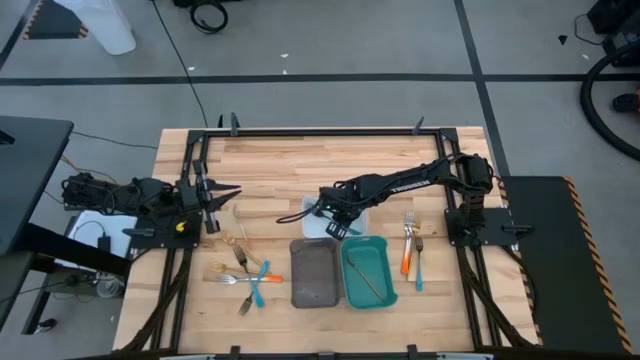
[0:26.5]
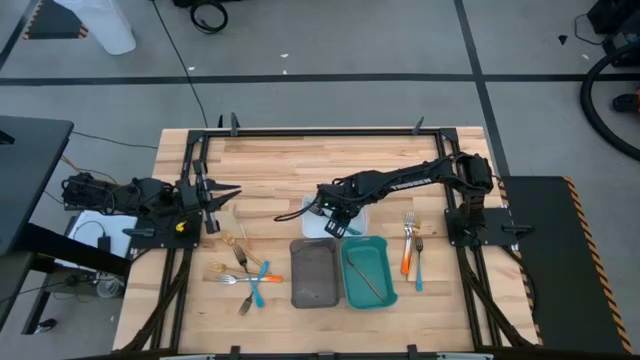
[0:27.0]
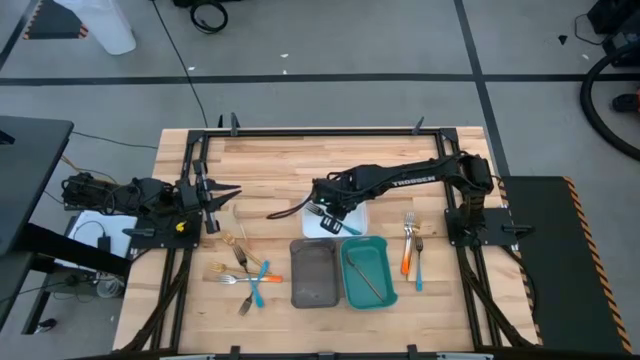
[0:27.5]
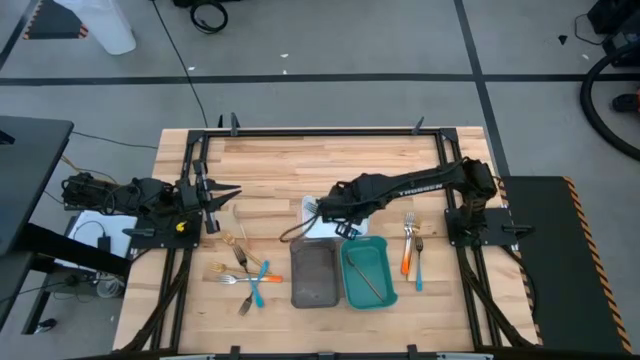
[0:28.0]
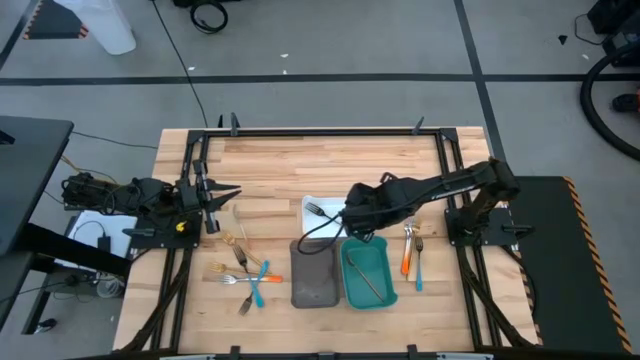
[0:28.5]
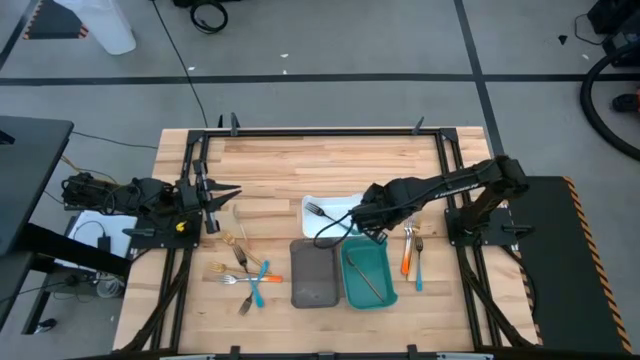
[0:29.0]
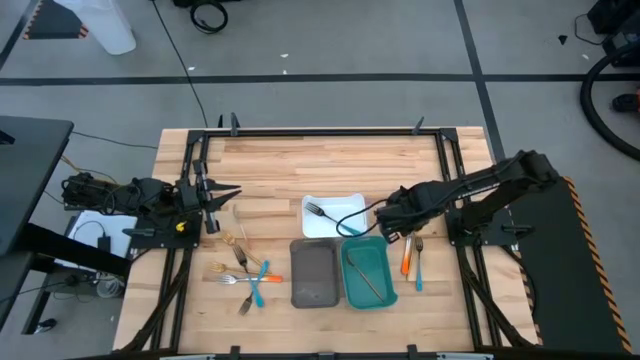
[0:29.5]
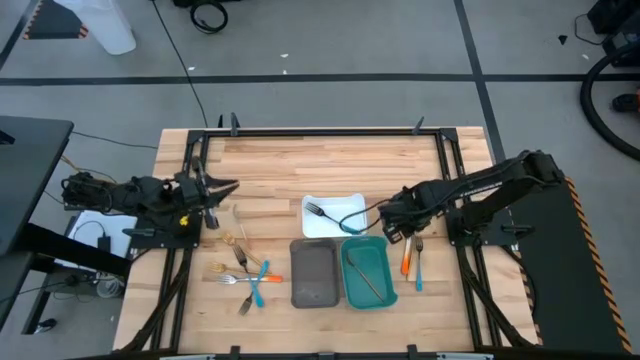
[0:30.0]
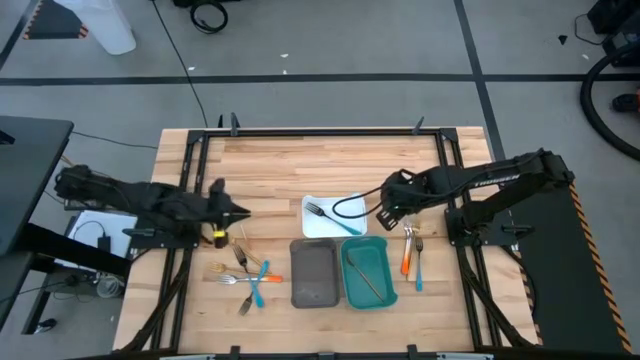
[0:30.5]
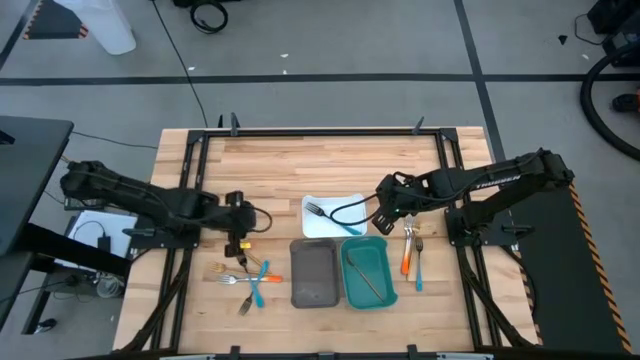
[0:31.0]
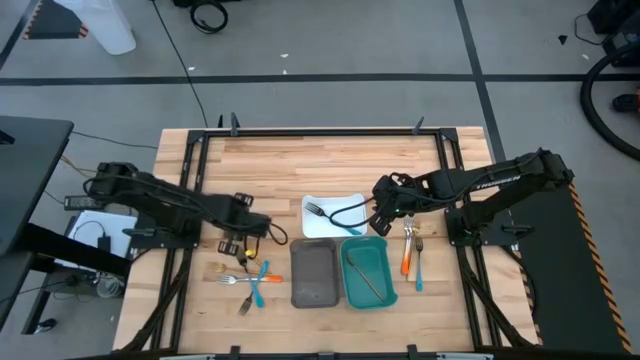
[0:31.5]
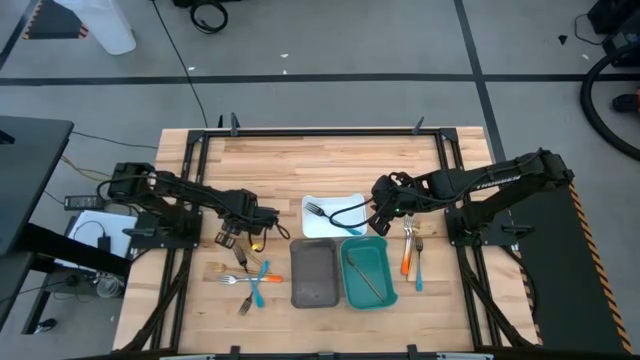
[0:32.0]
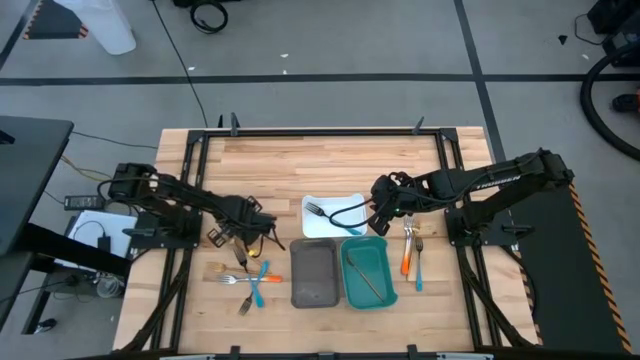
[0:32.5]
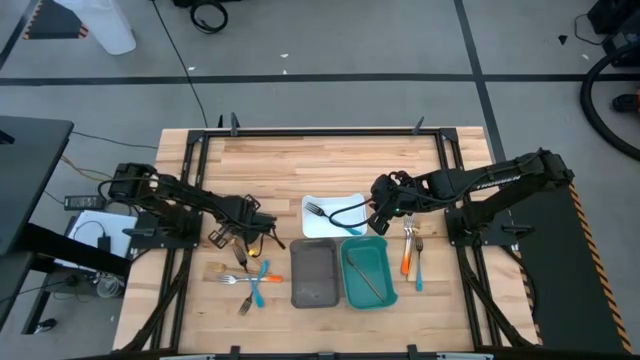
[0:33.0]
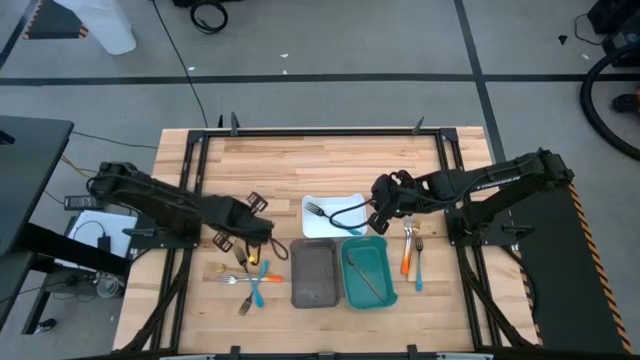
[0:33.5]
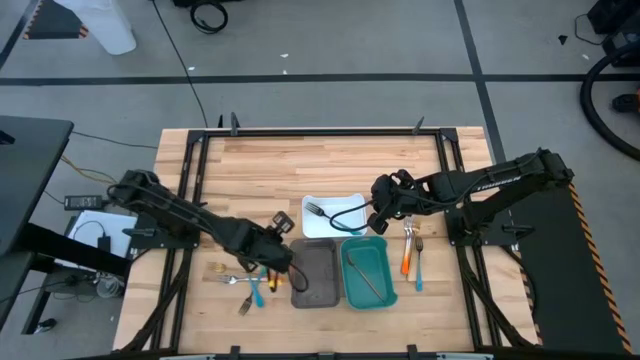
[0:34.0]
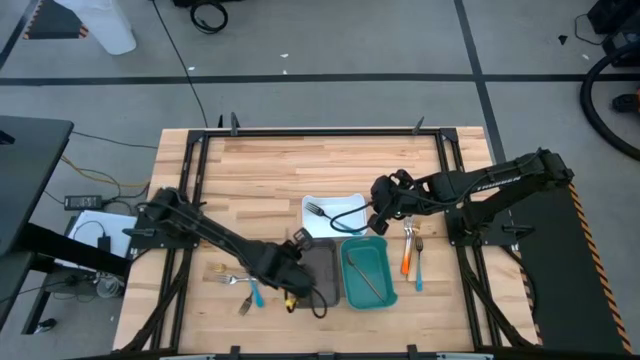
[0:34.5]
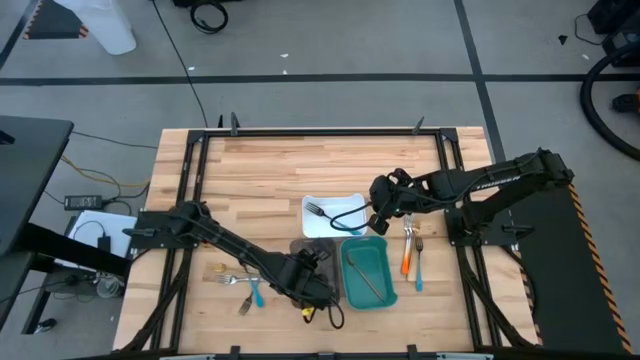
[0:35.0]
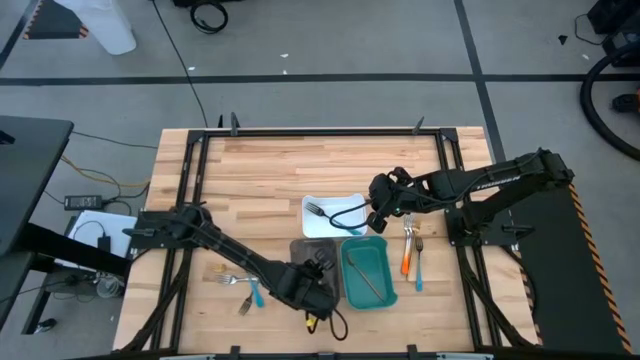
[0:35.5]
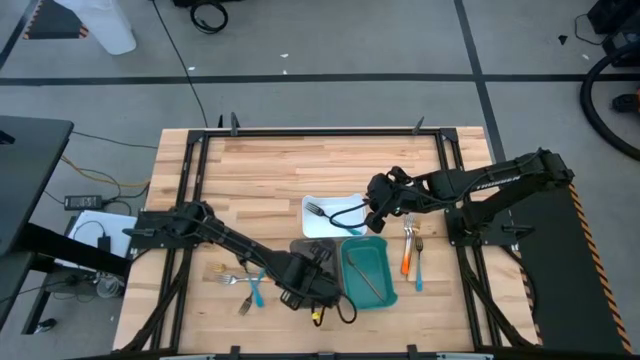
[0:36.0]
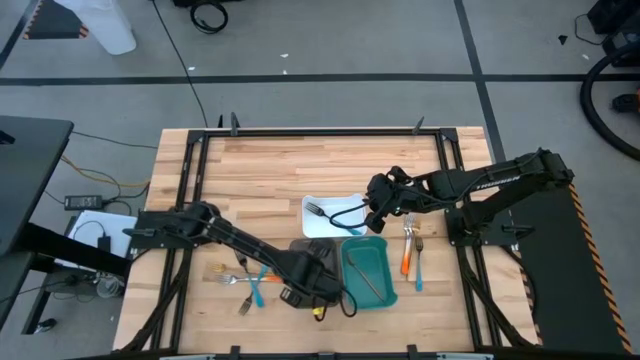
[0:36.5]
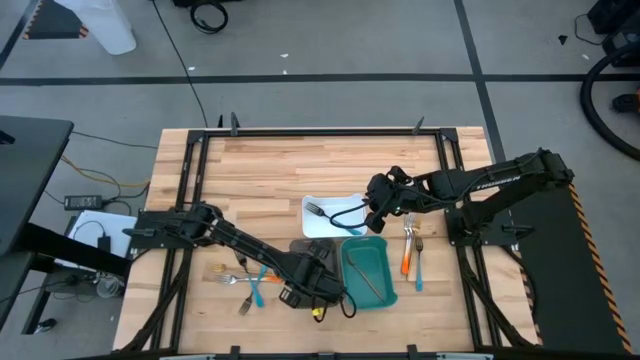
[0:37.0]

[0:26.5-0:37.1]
Task: Sort silverware by color (type)
Put the orange fork into the black bin

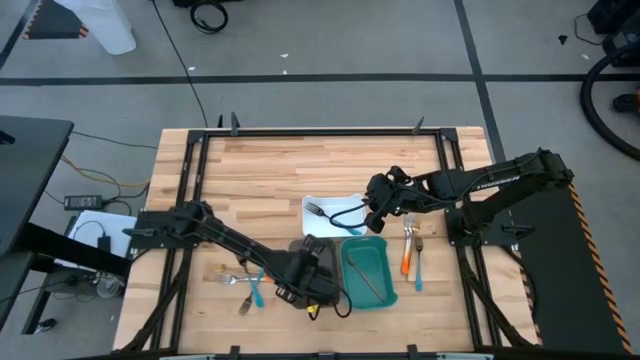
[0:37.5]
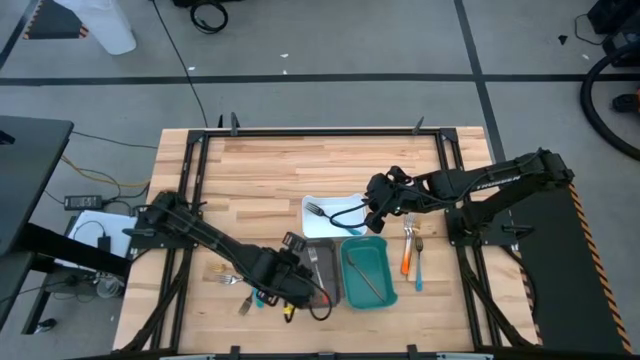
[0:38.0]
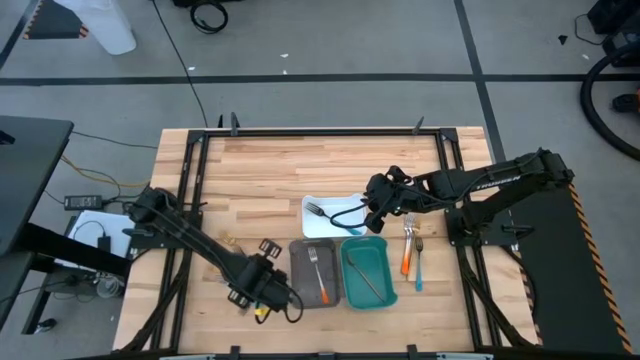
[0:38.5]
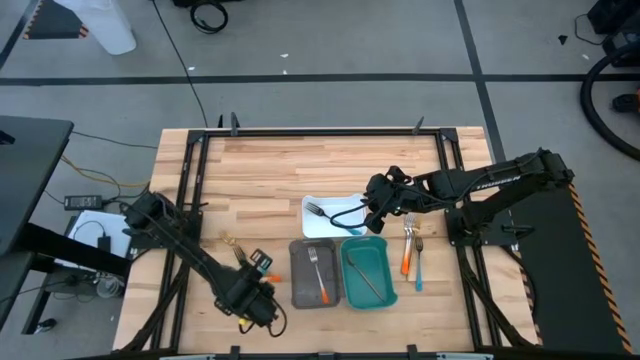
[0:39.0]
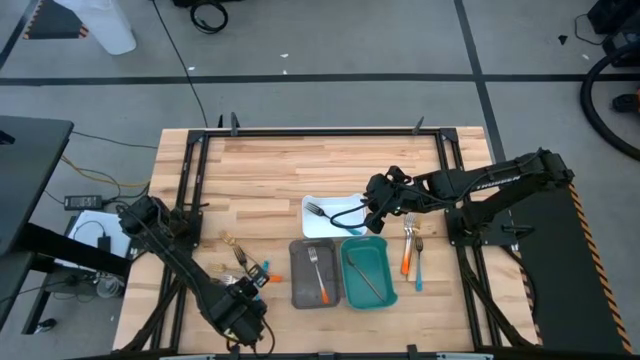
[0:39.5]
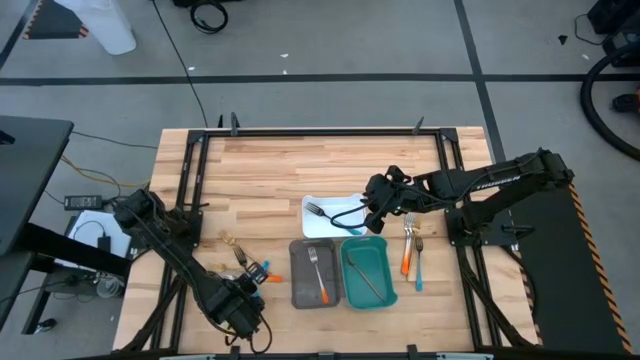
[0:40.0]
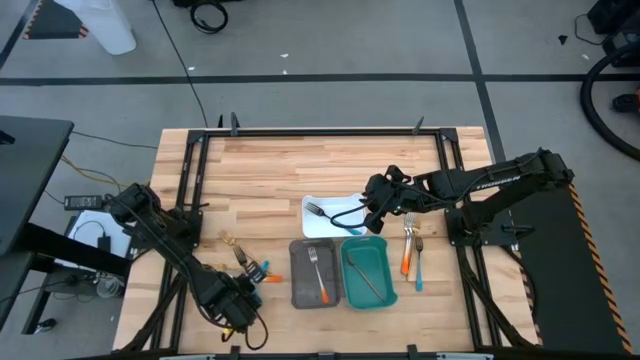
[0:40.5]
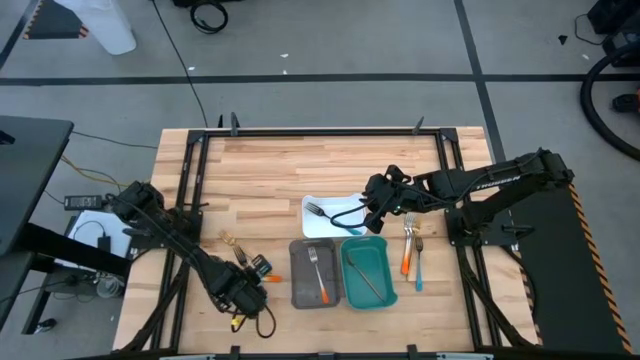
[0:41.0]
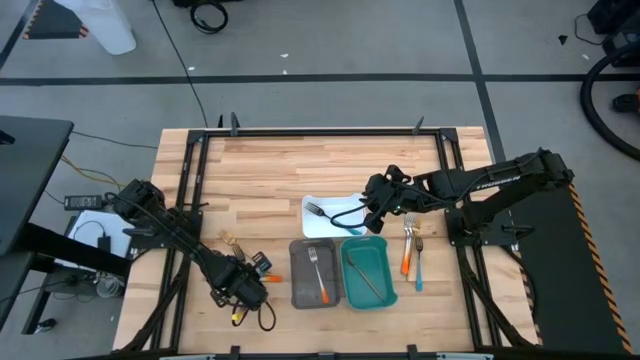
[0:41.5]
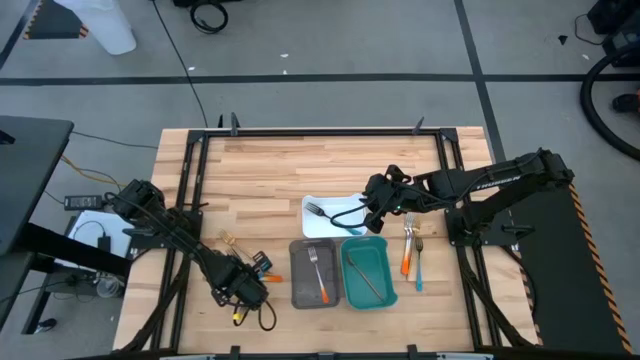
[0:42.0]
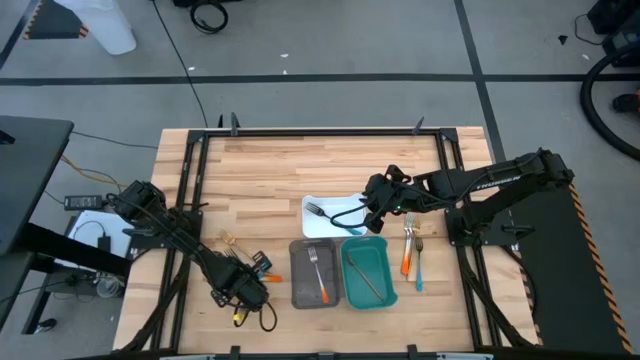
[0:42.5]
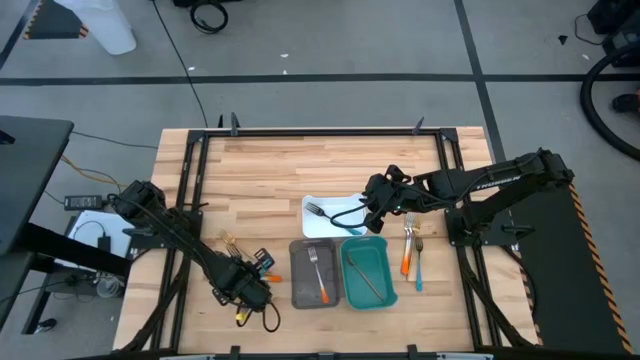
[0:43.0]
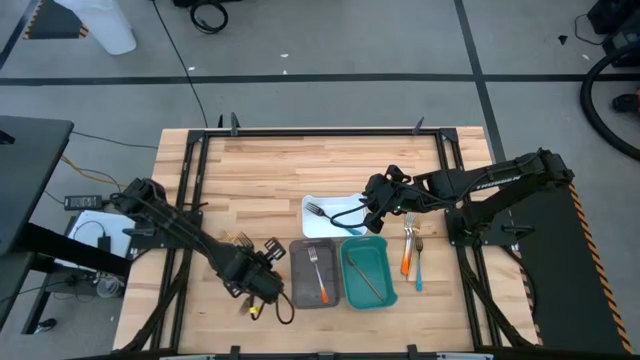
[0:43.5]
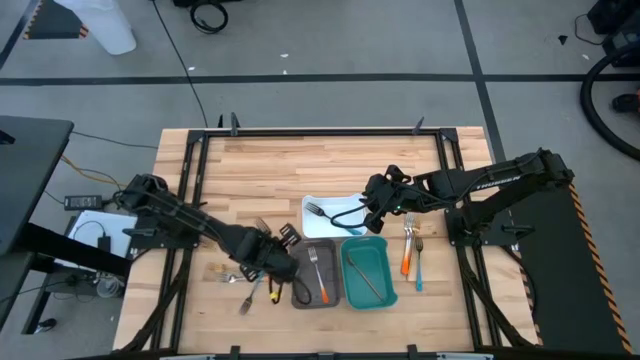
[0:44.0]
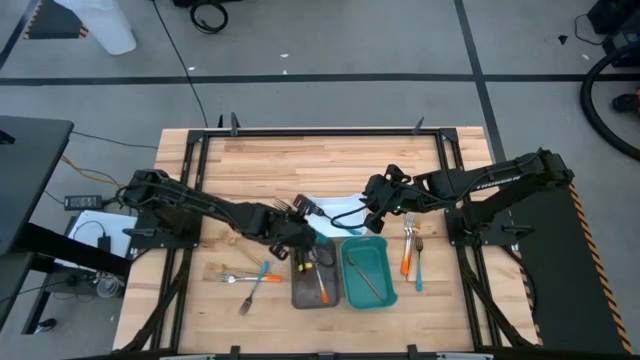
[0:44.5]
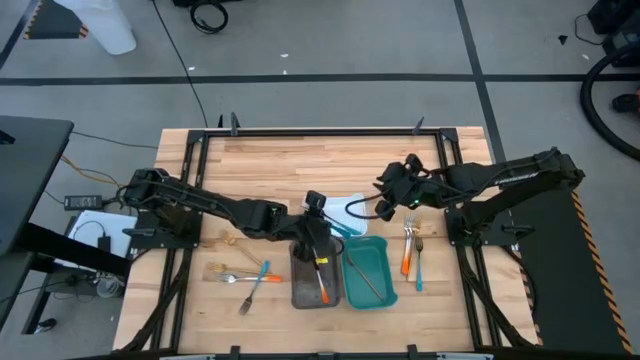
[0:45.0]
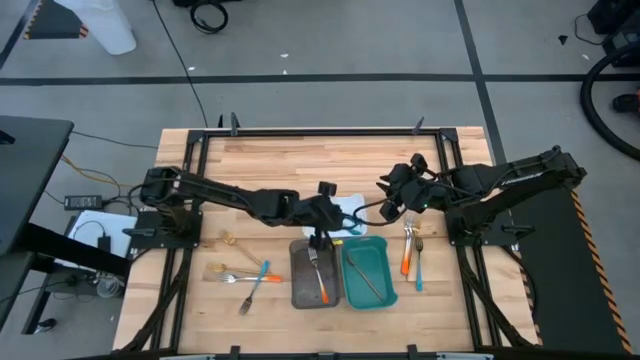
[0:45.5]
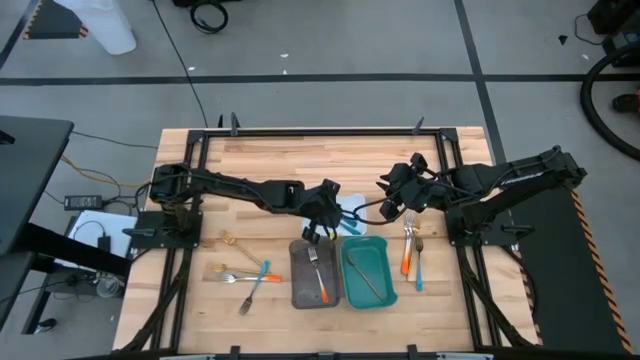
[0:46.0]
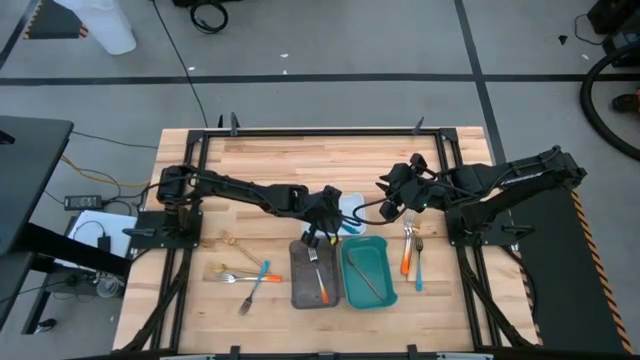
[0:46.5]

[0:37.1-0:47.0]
Put the blue fork into the white bin
